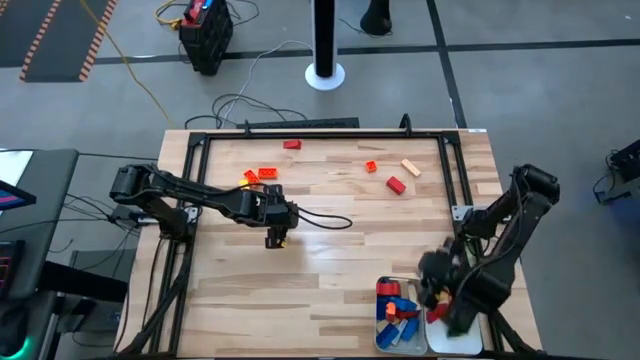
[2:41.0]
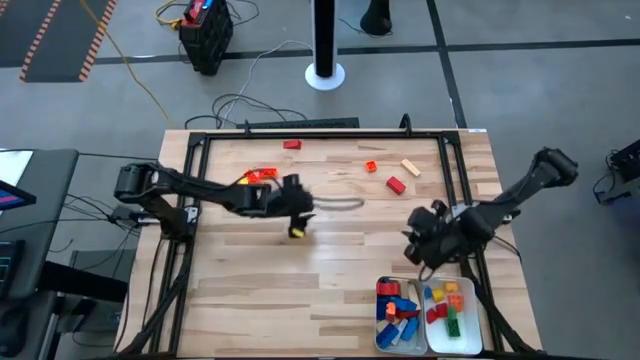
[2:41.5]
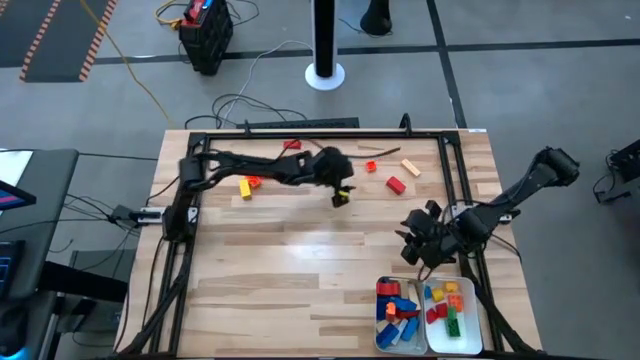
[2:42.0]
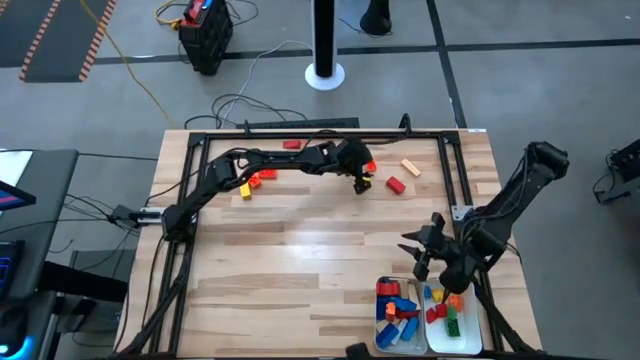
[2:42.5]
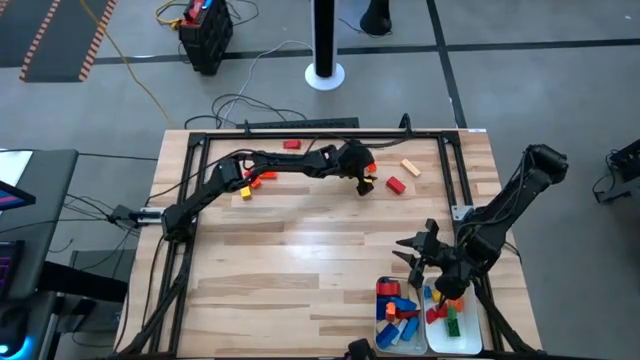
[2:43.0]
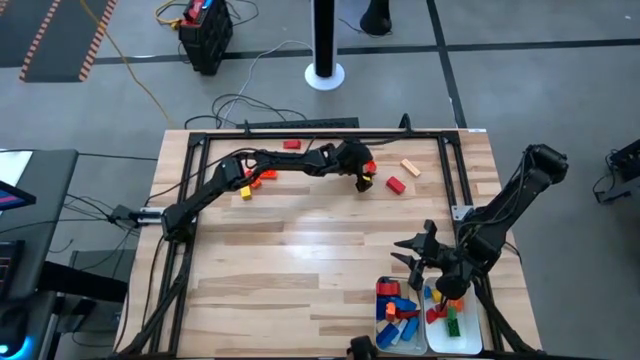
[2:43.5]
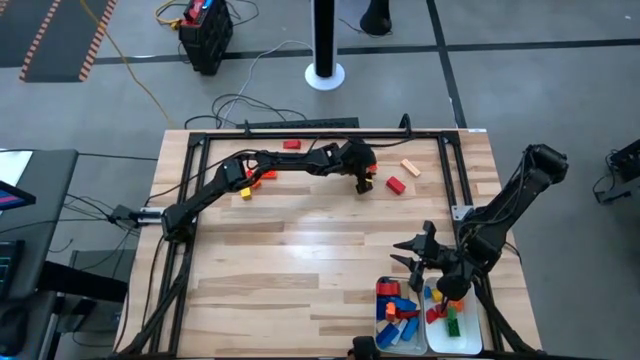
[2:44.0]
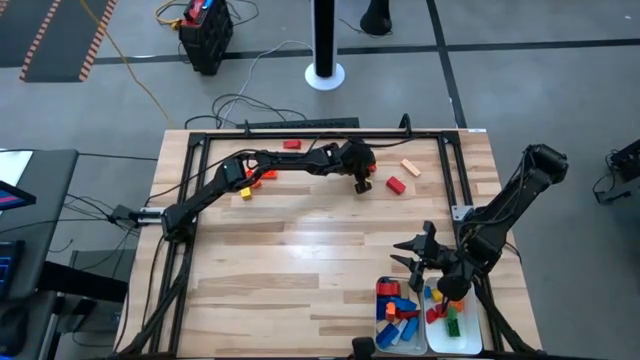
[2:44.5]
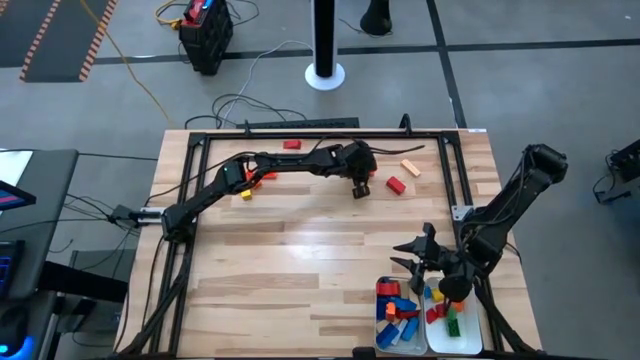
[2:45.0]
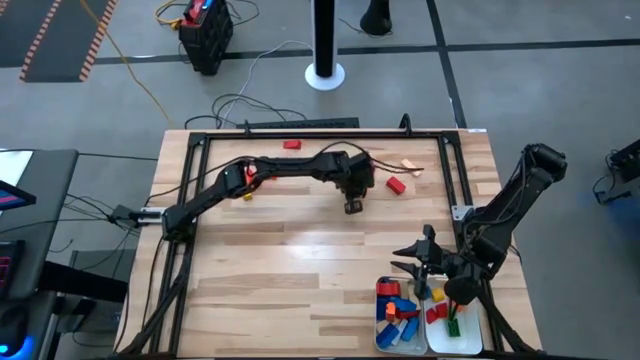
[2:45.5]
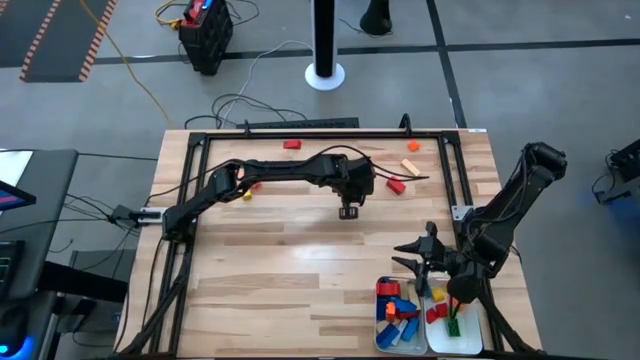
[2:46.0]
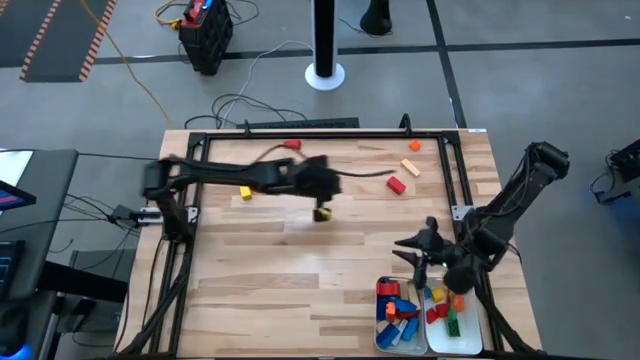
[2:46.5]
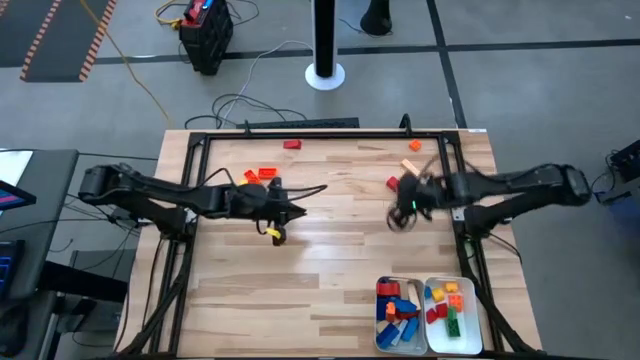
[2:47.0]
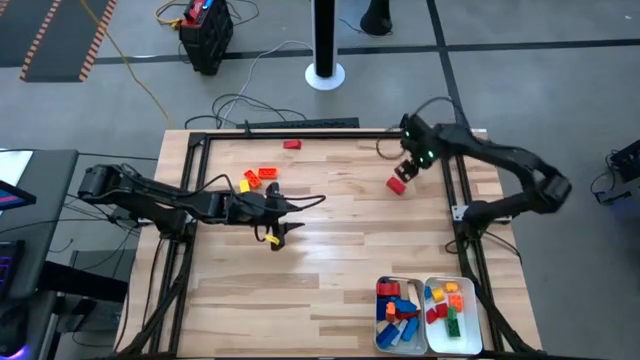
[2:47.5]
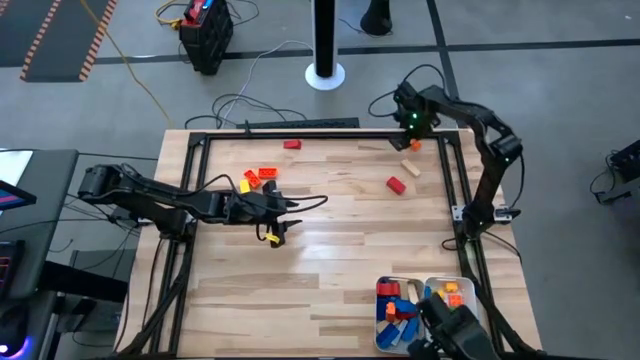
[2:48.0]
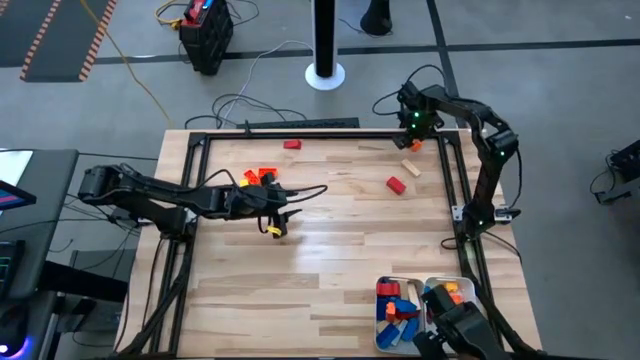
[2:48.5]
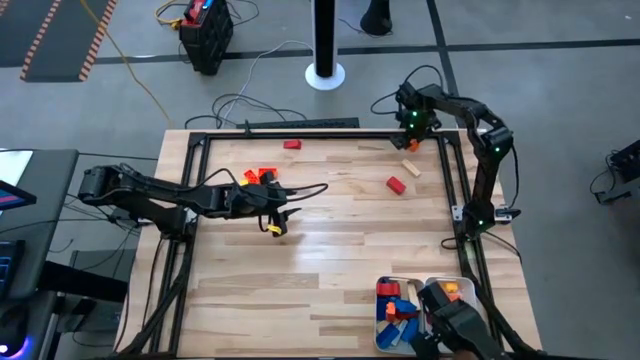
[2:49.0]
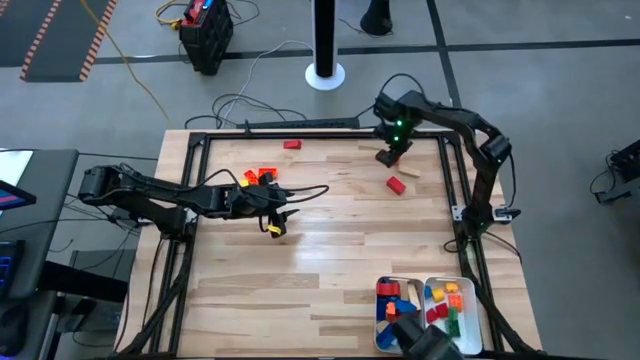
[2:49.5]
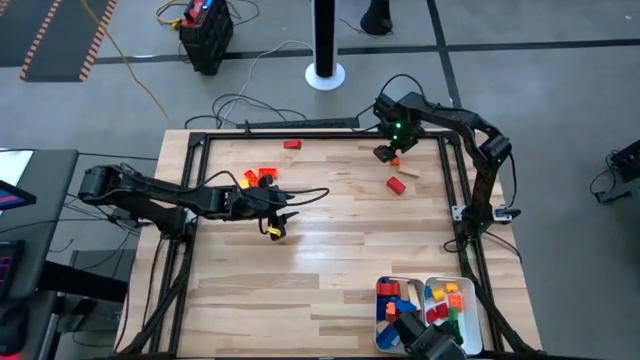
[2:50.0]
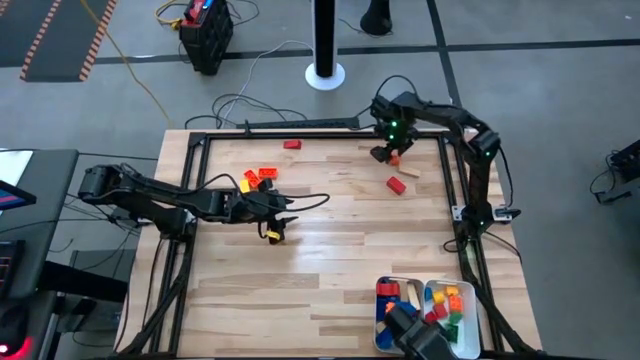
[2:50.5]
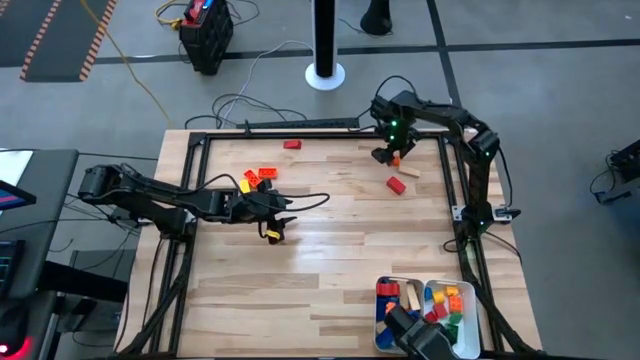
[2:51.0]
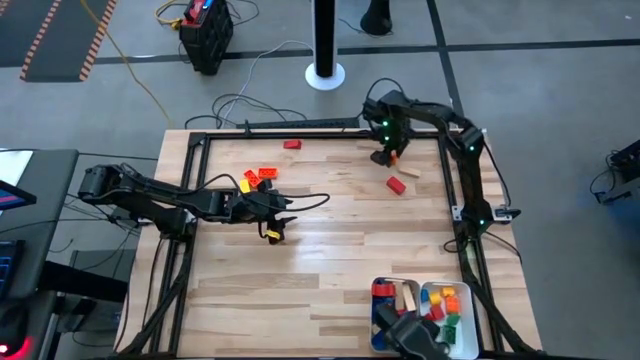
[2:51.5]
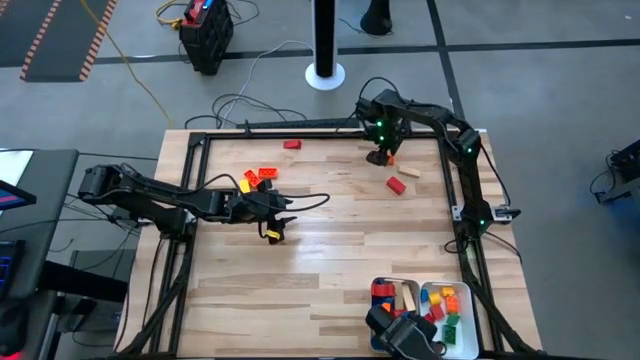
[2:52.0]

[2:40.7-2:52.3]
Task: Sort blocks by size
Put the small orange game piece into the white bin

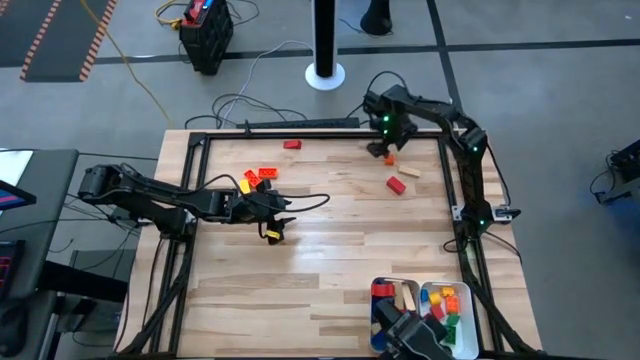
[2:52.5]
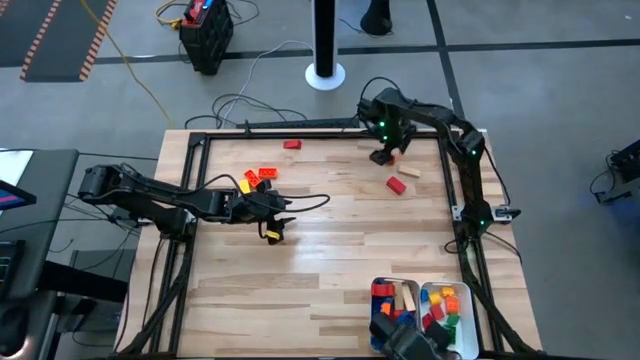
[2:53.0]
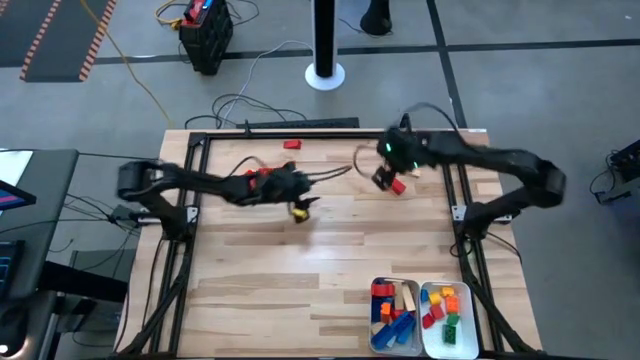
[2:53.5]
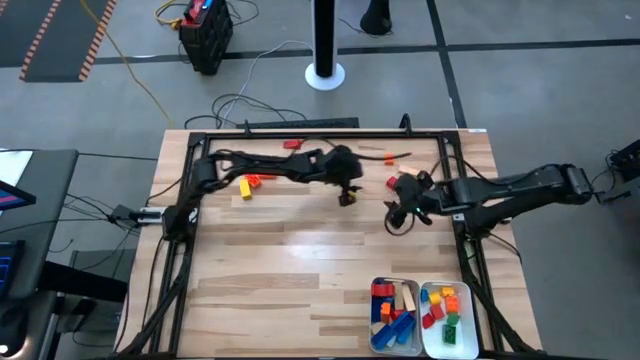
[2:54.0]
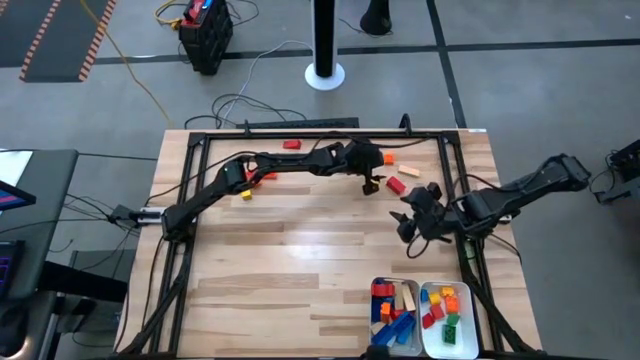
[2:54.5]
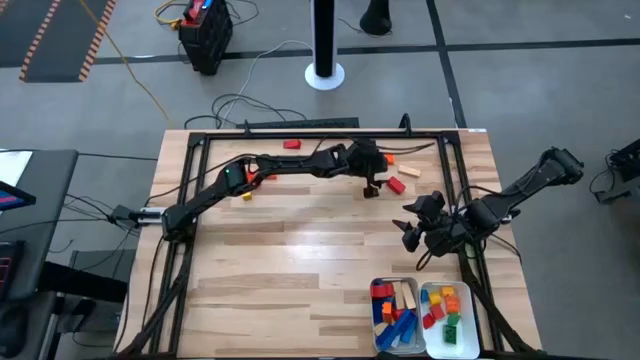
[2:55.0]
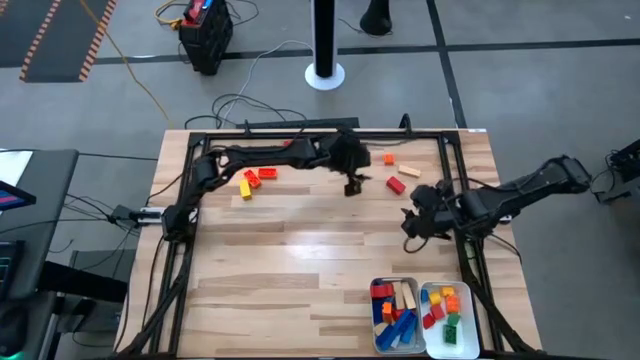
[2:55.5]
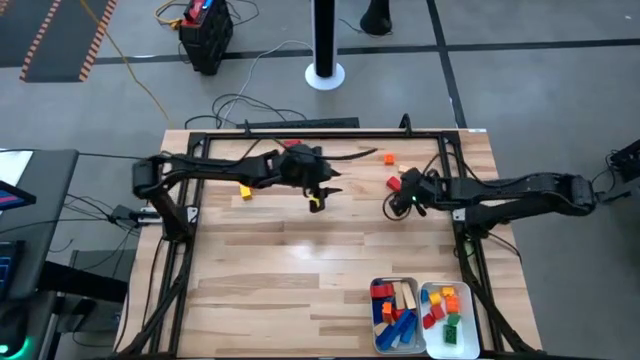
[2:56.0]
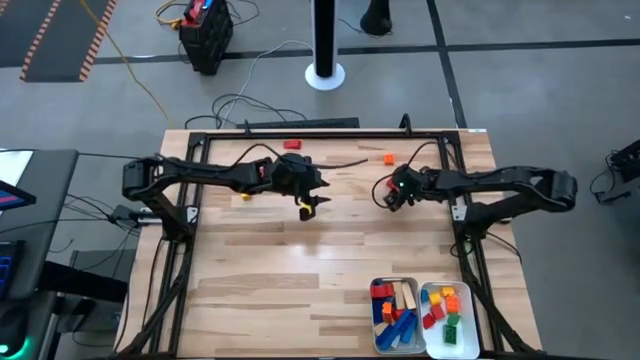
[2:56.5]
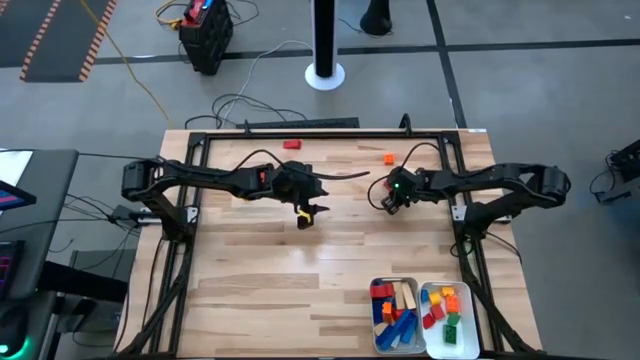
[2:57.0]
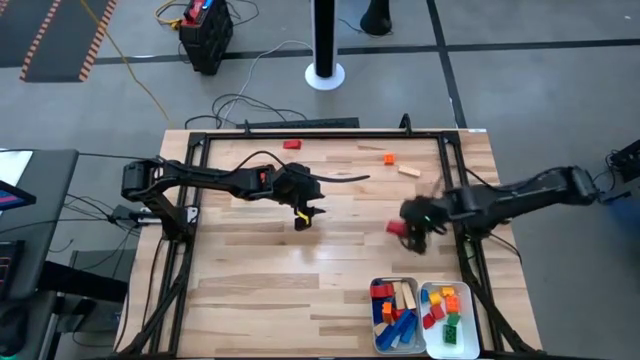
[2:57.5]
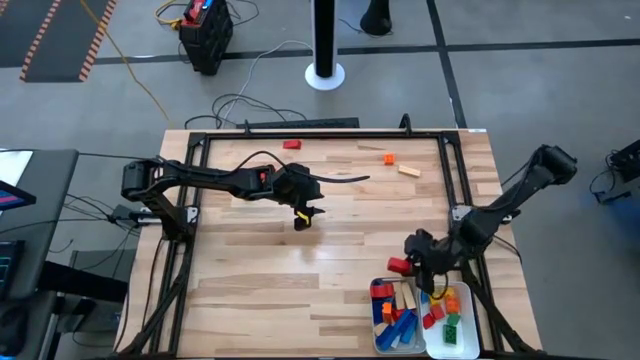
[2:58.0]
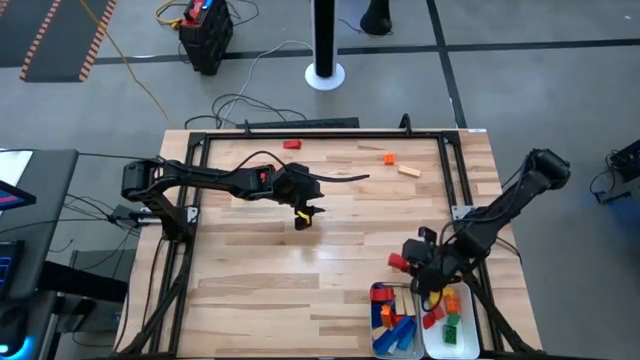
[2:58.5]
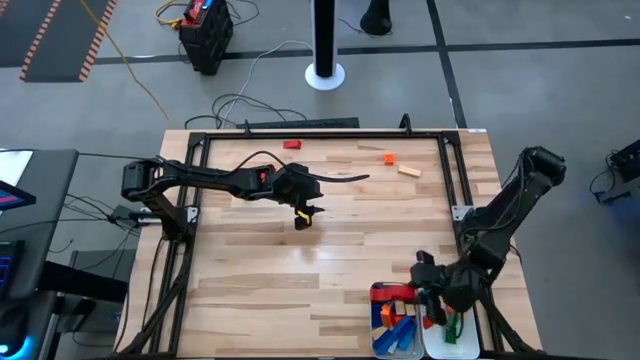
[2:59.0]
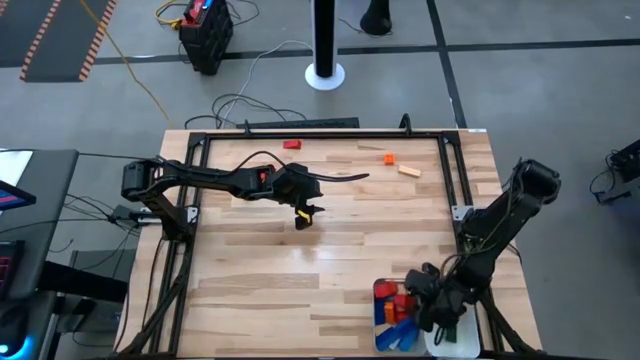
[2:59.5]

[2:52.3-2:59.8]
Put the large red wooden block into the gray bin

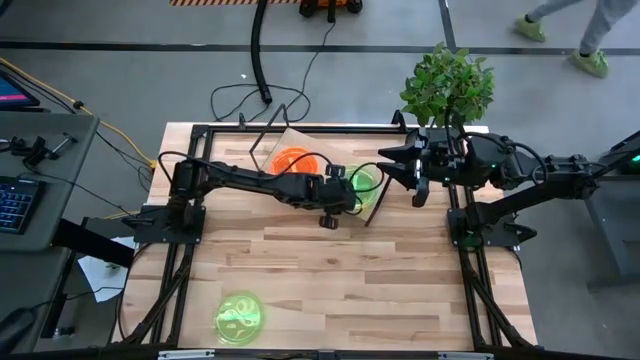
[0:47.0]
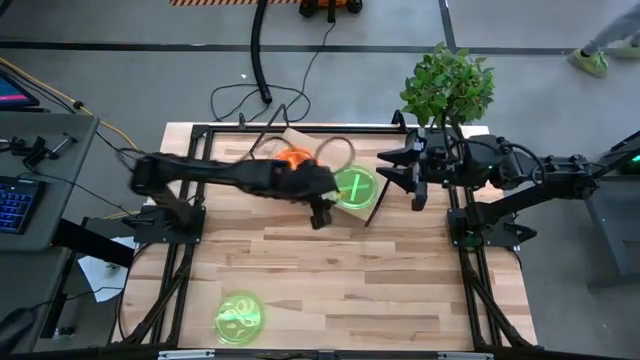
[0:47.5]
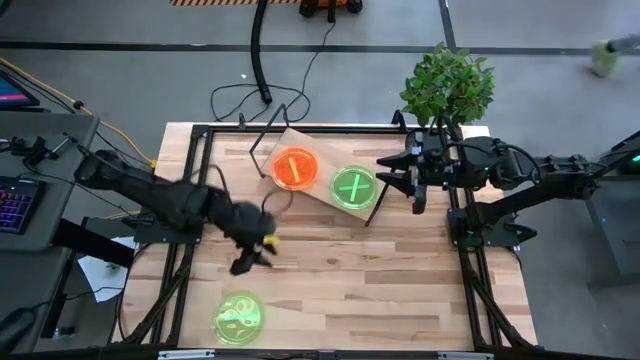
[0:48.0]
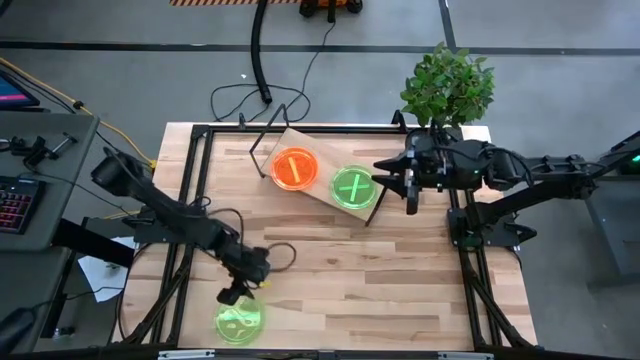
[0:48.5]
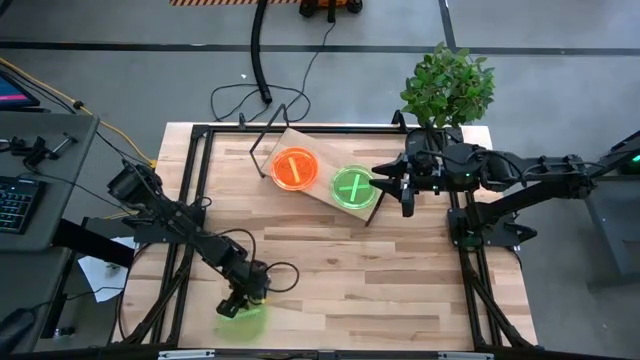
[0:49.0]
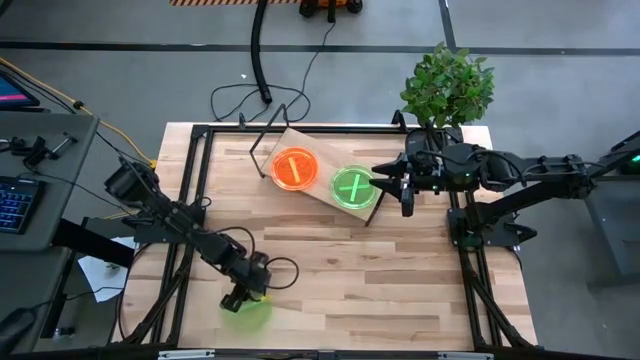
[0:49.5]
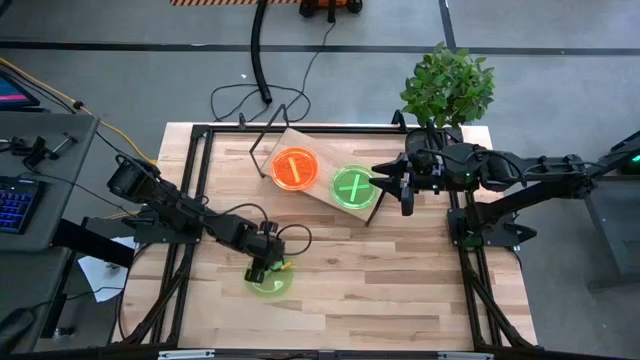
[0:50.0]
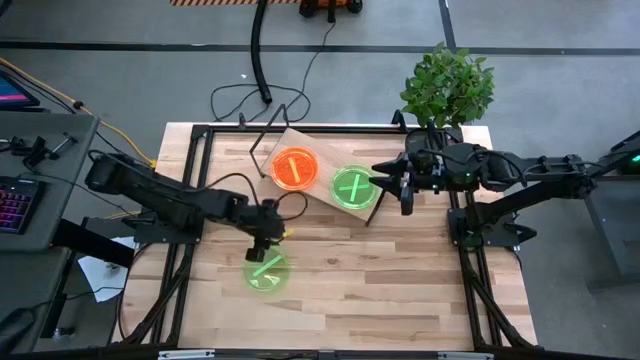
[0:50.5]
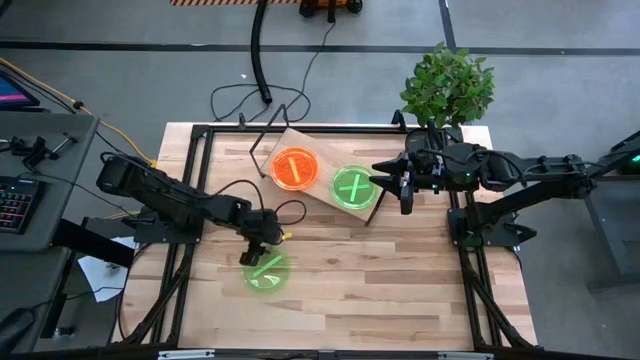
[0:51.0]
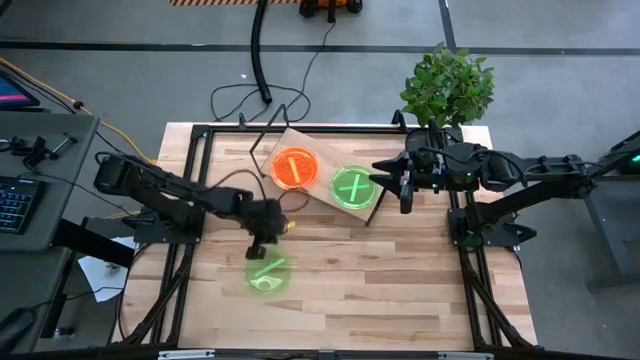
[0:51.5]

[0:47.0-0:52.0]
Task: Place and stack plates onto a shelf
Stack the green plate on the green plate on the shelf
